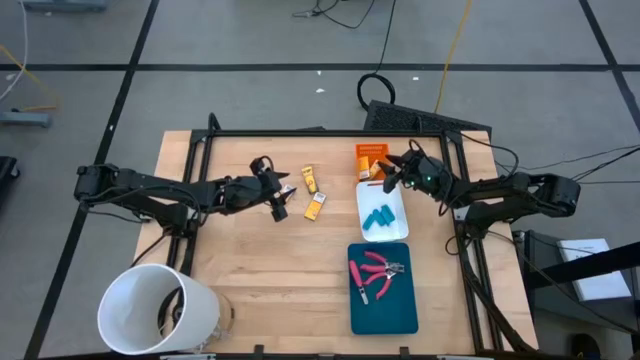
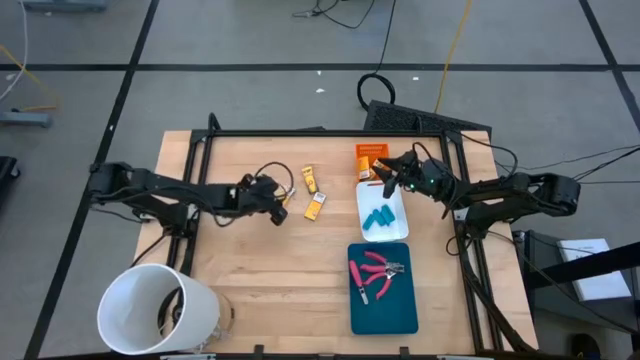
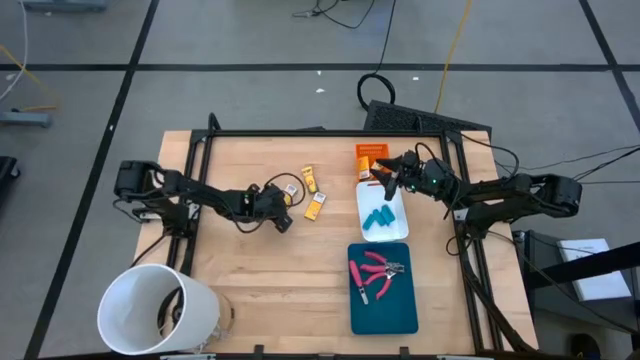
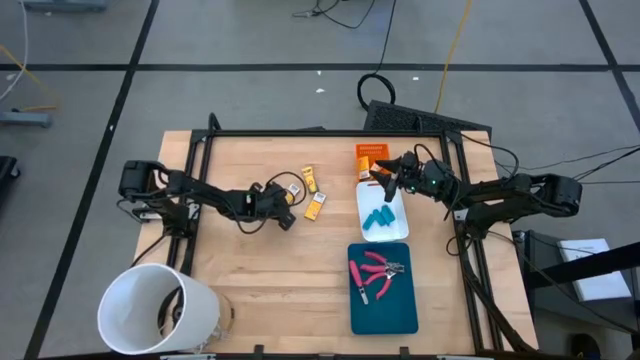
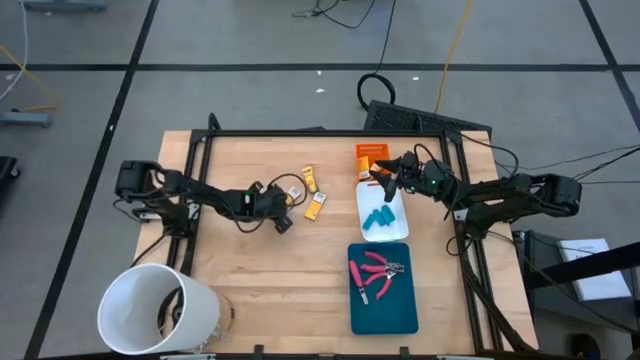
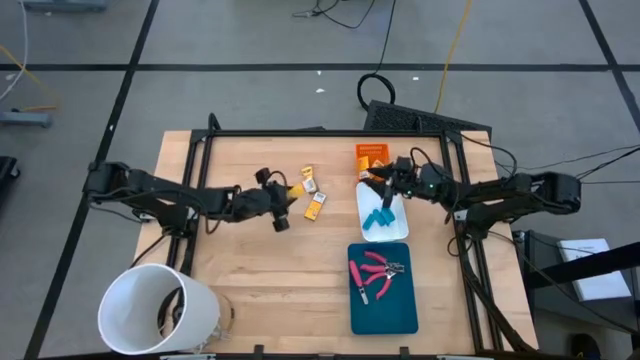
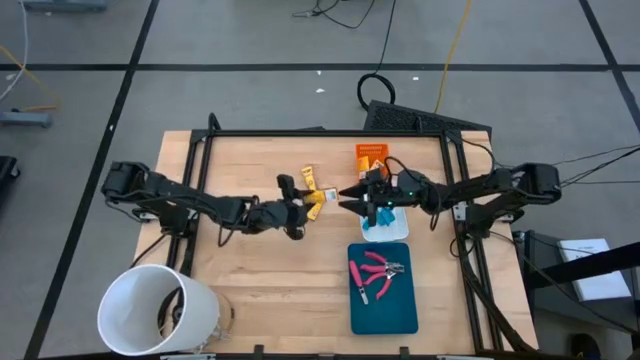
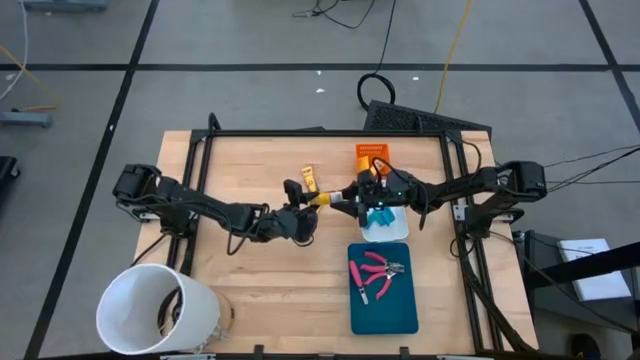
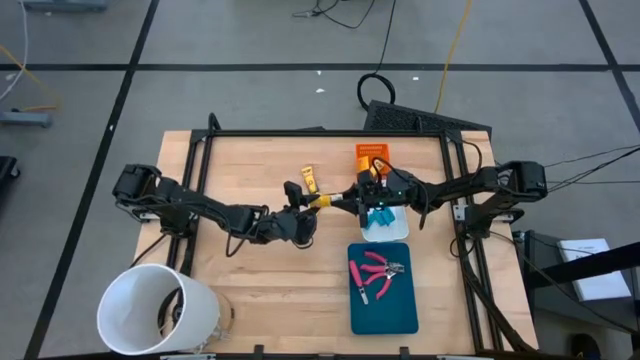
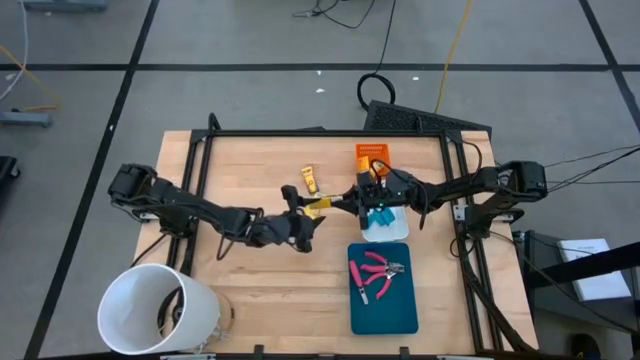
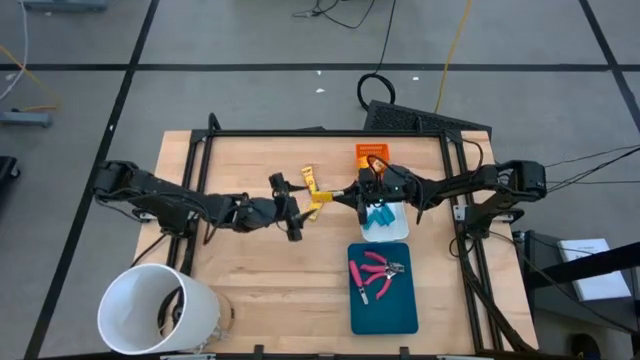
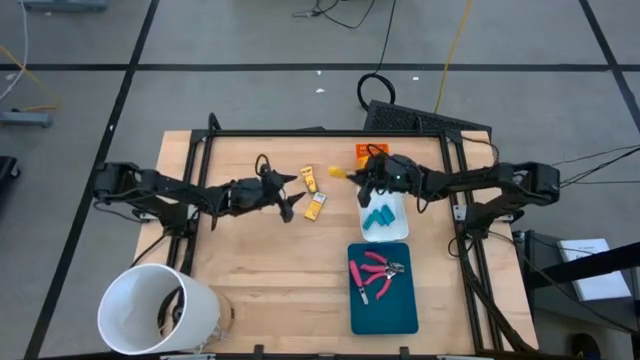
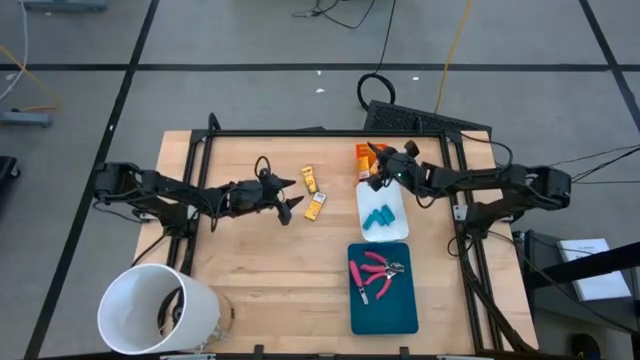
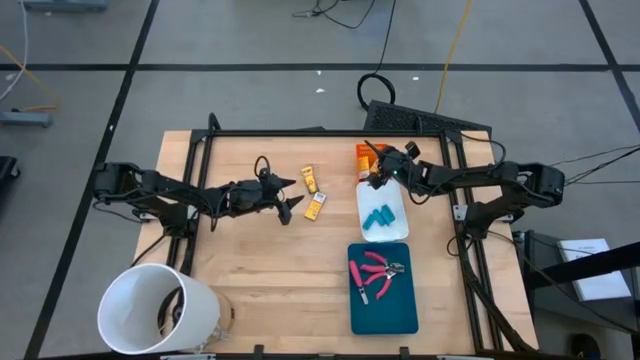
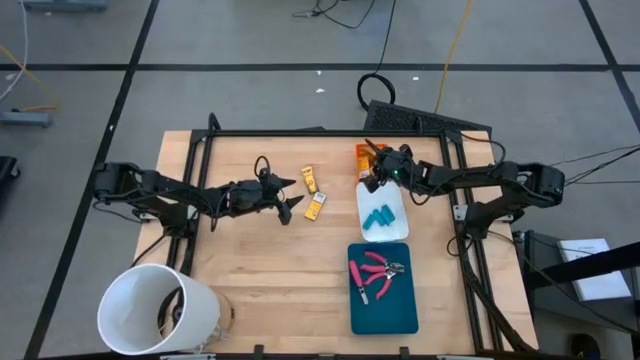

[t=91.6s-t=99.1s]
Task: Pick & Place School Supplies
Put the yellow crayon box into the orange bin

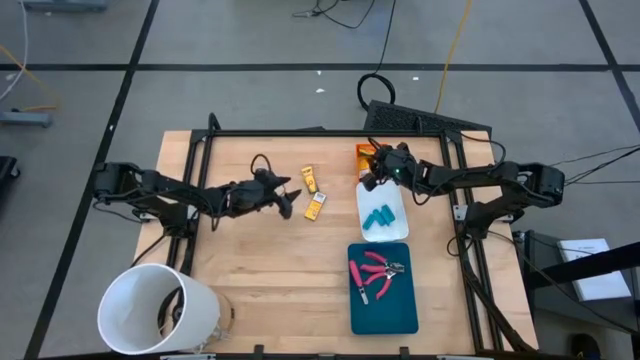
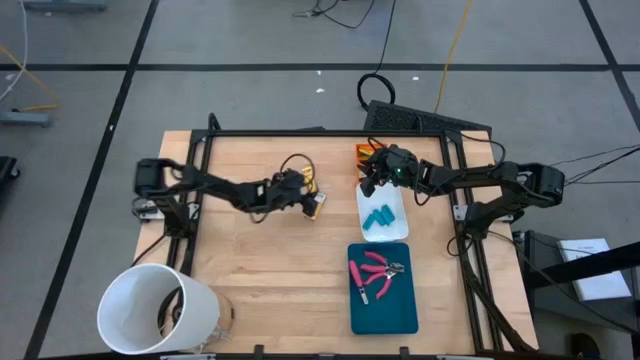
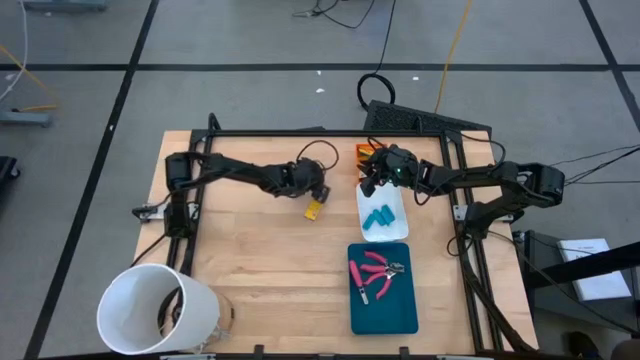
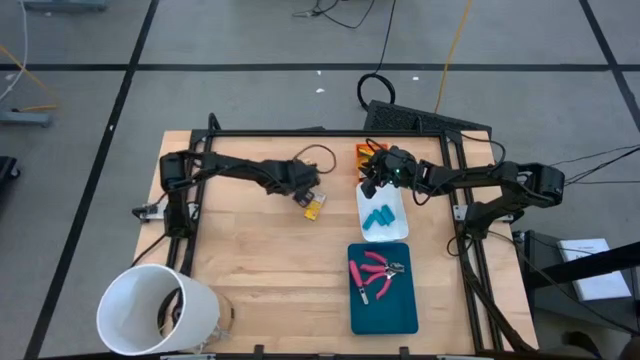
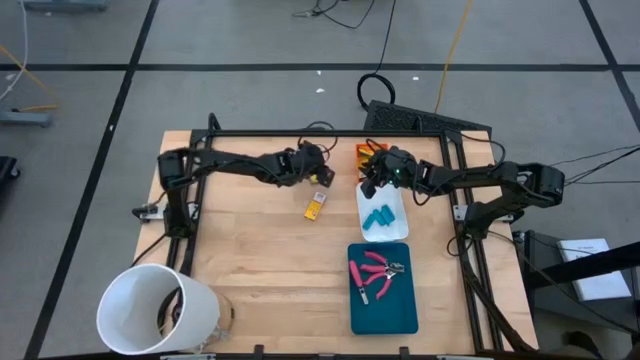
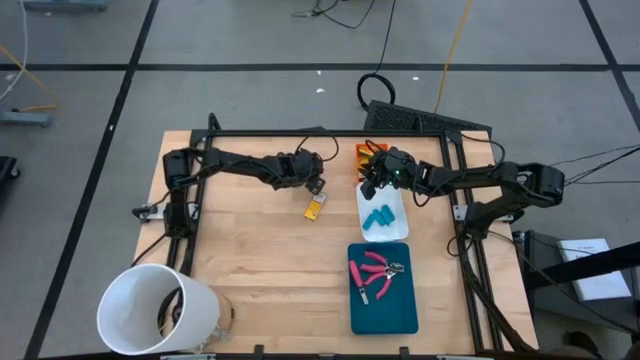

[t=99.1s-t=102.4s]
Put the yellow crayon box into the orange bin

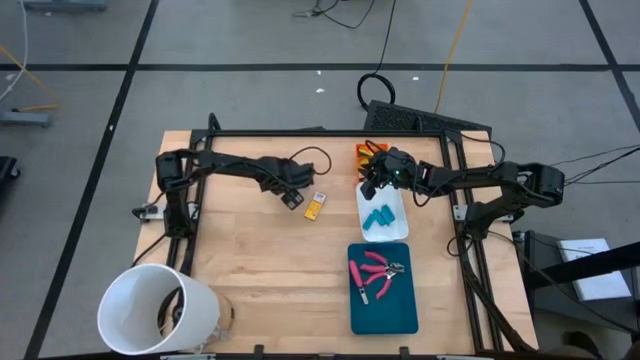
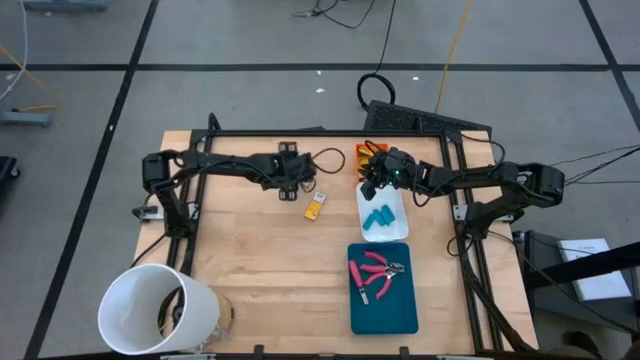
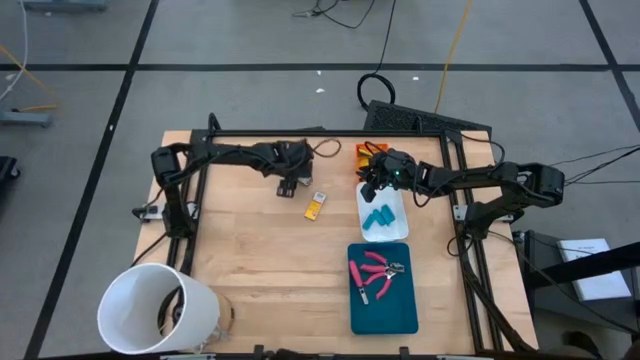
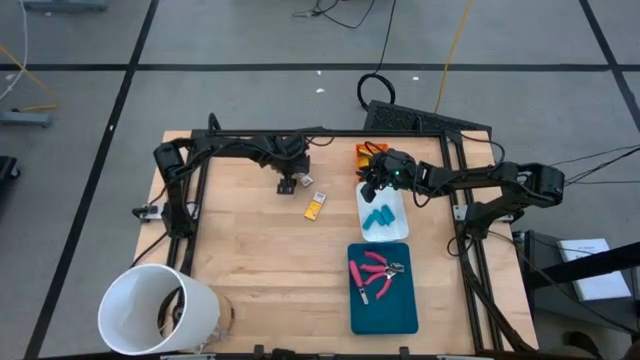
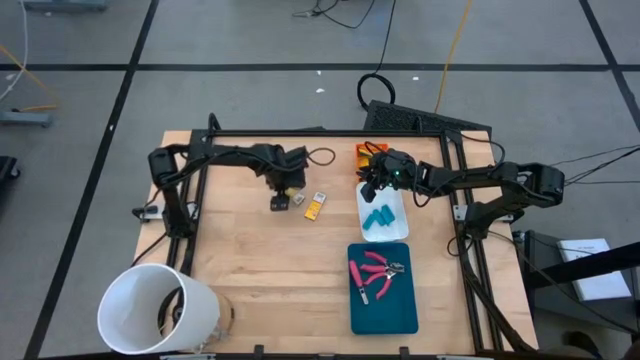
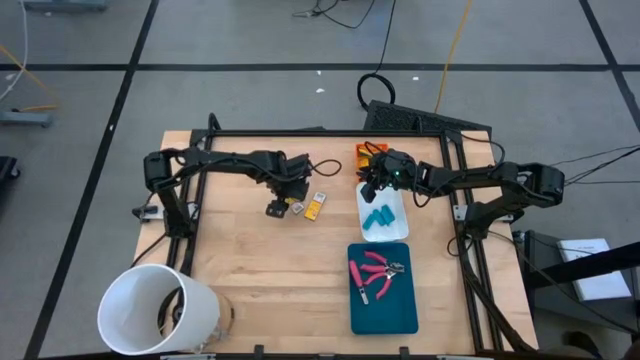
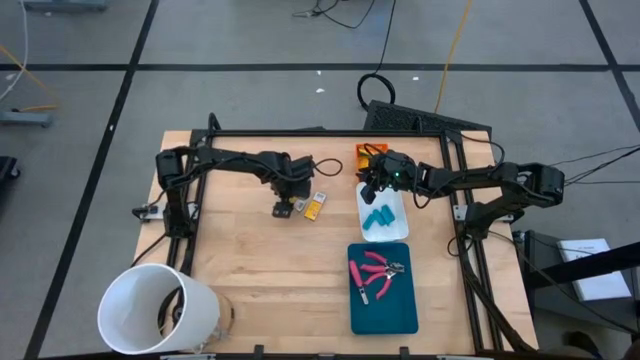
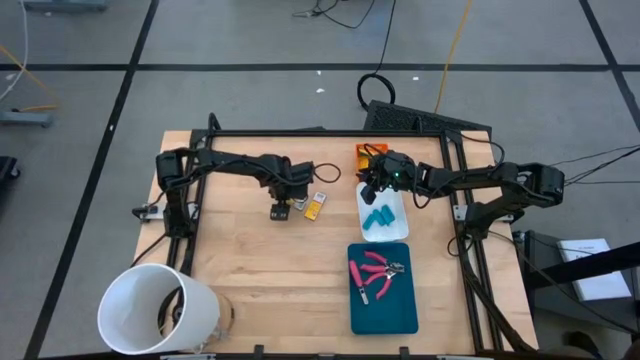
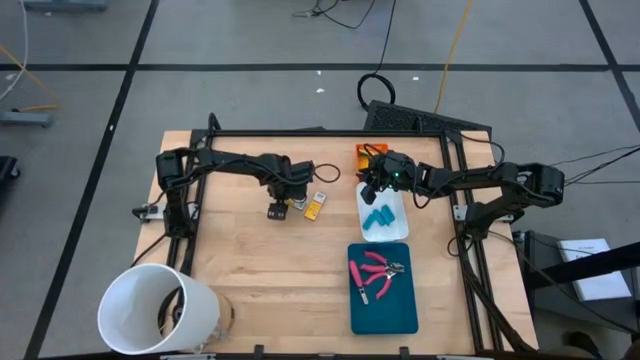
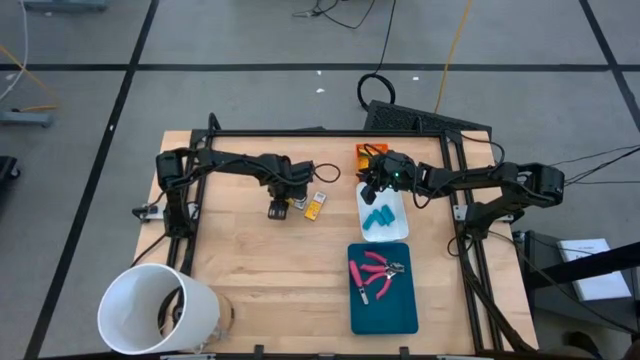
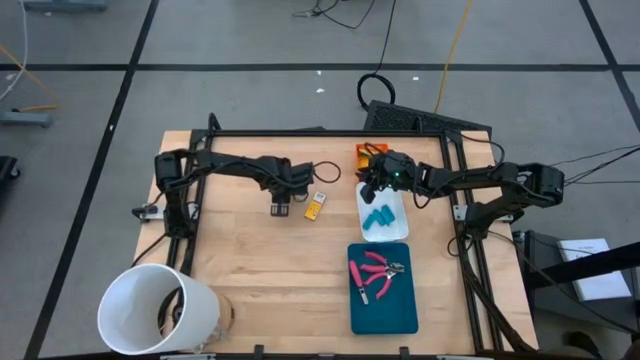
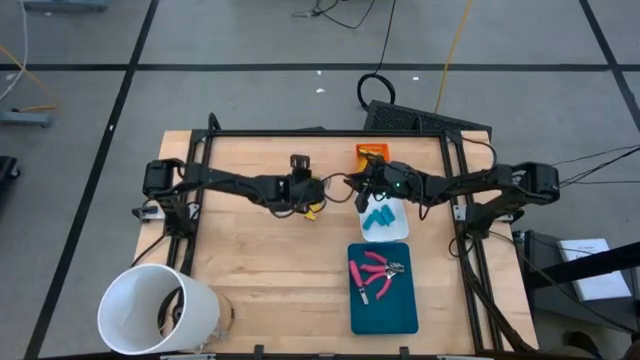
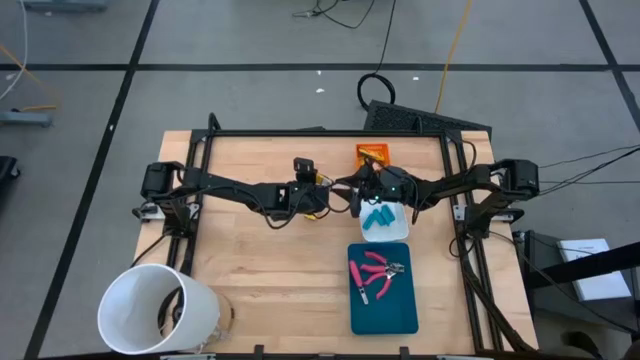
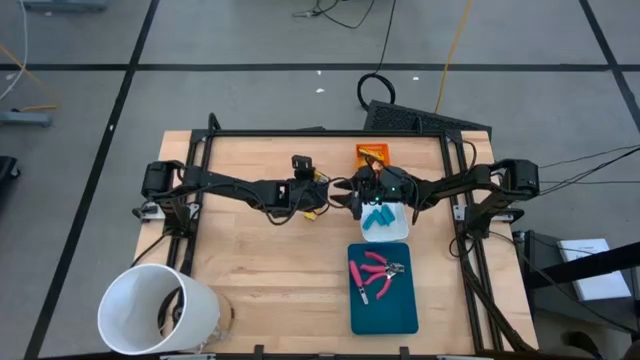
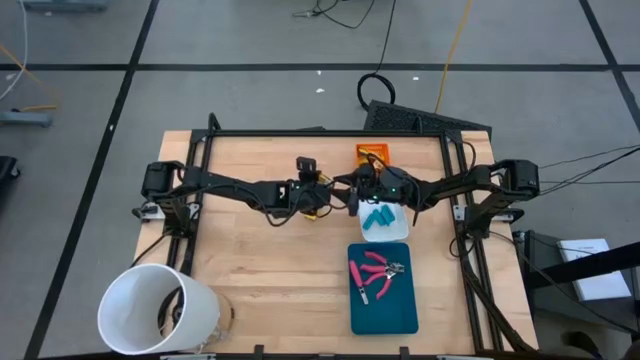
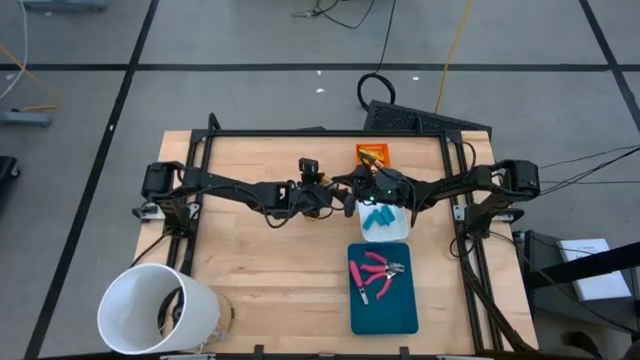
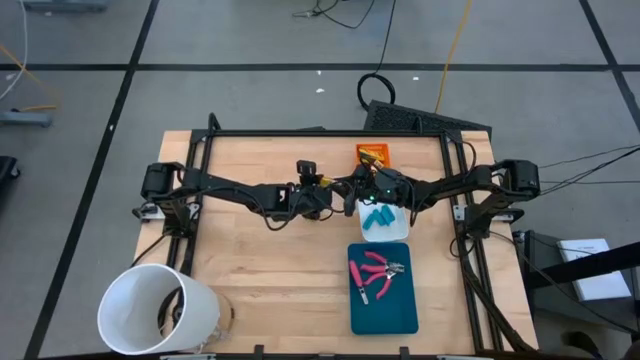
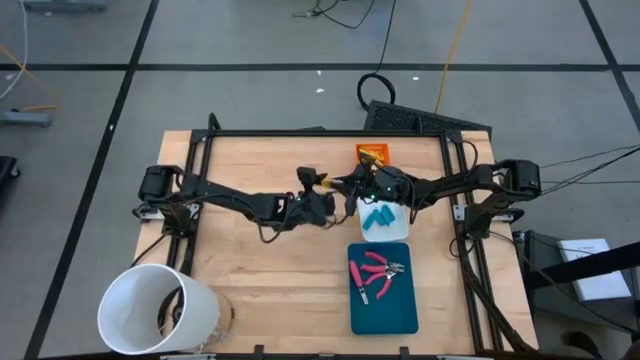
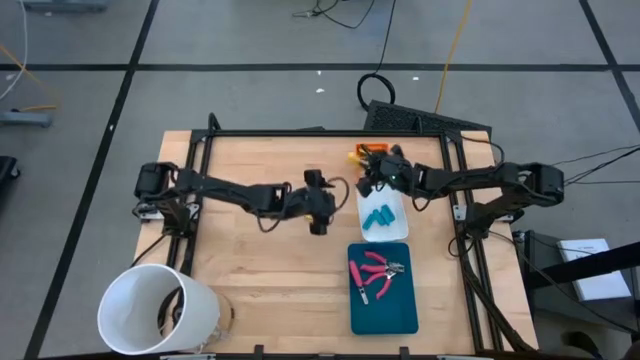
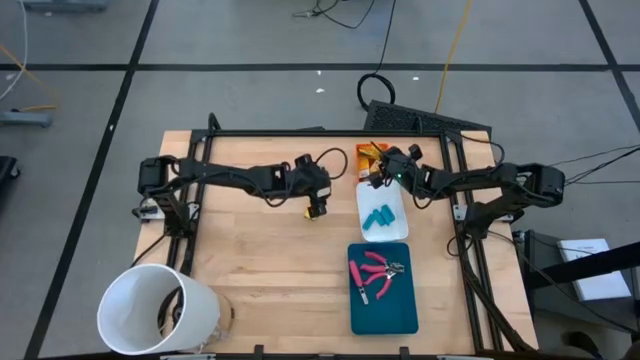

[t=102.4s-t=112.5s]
Put the yellow crayon box into the orange bin

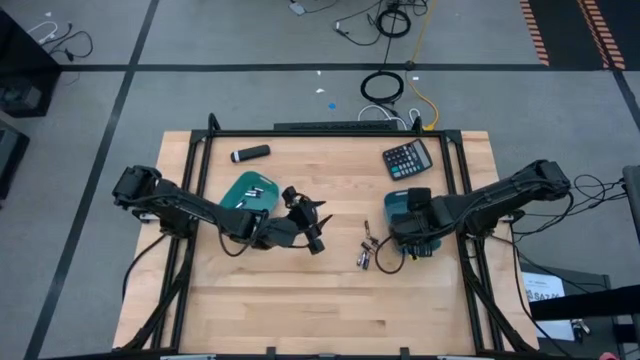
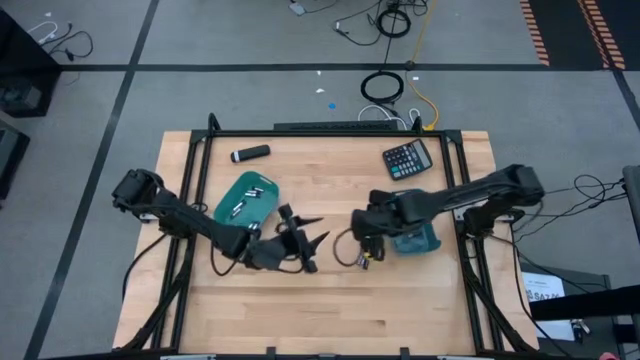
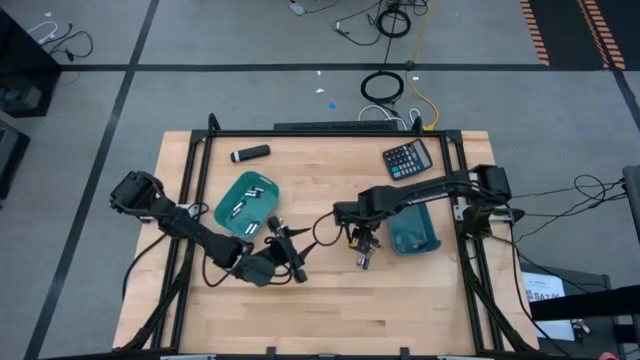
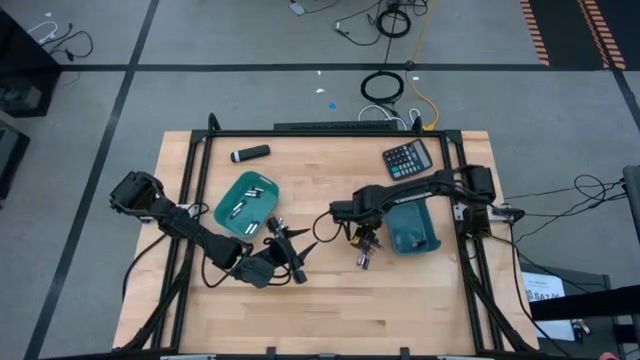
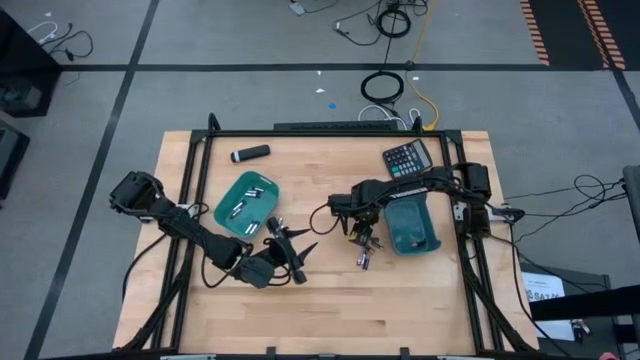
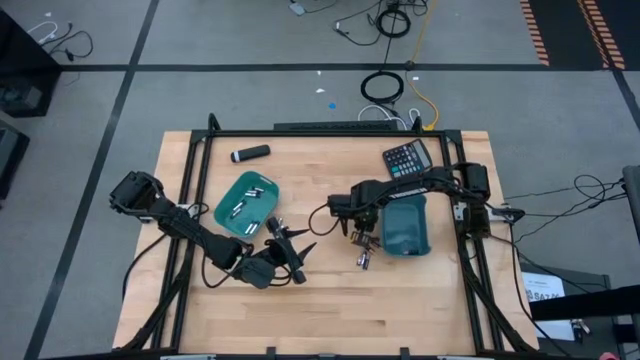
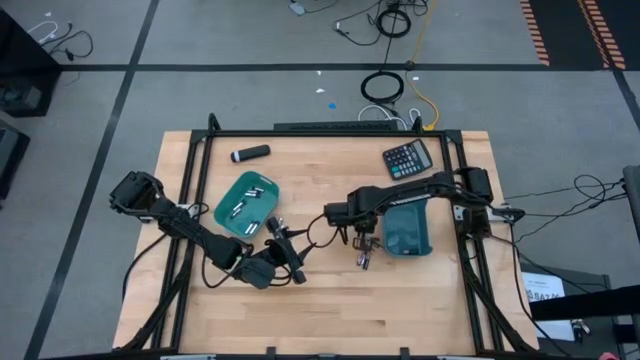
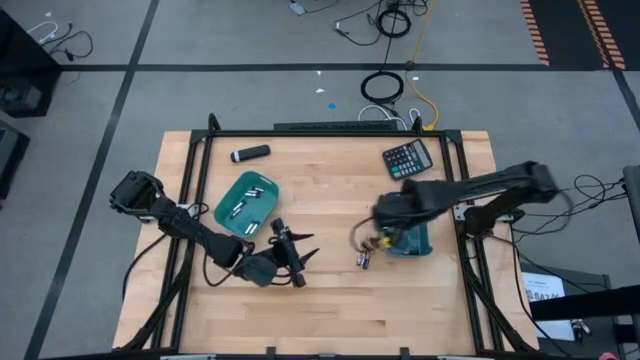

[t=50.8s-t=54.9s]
Task: Sort batteries
Put the black battery into the blue bin
